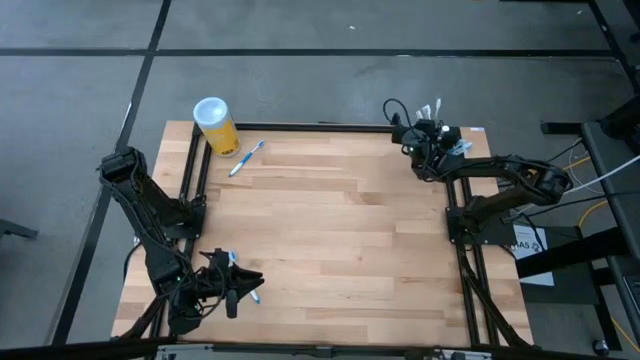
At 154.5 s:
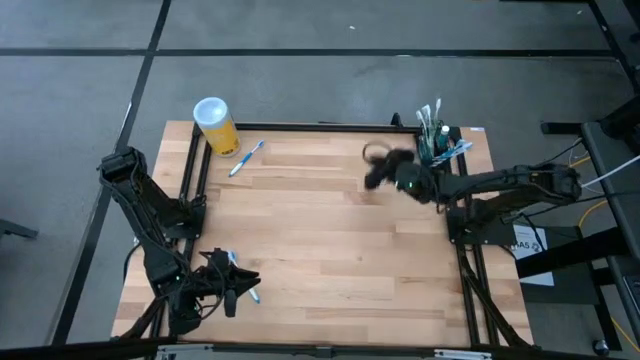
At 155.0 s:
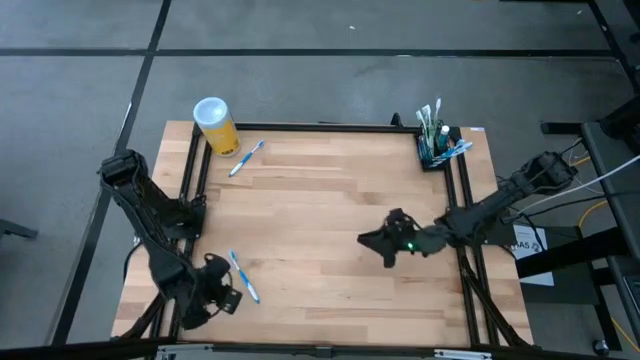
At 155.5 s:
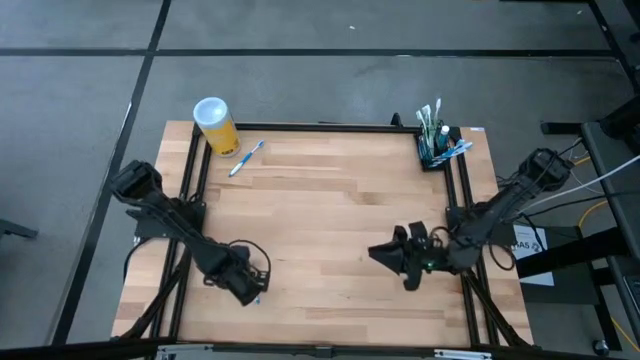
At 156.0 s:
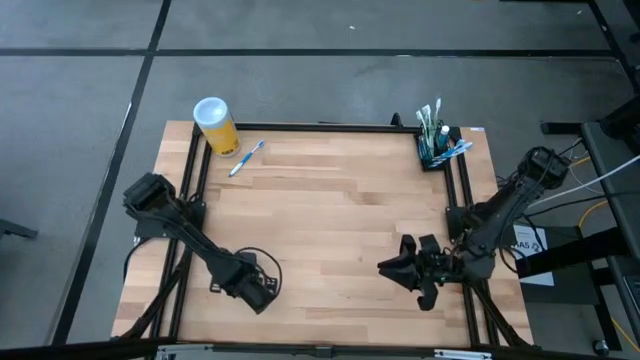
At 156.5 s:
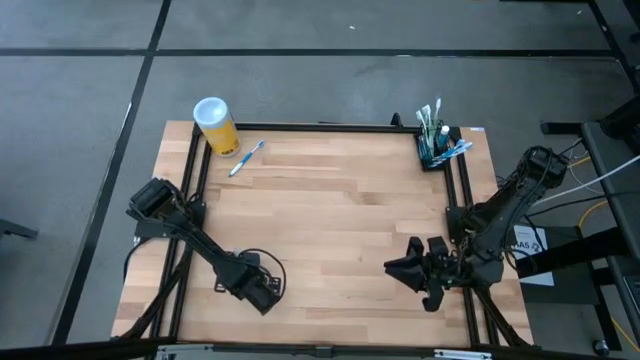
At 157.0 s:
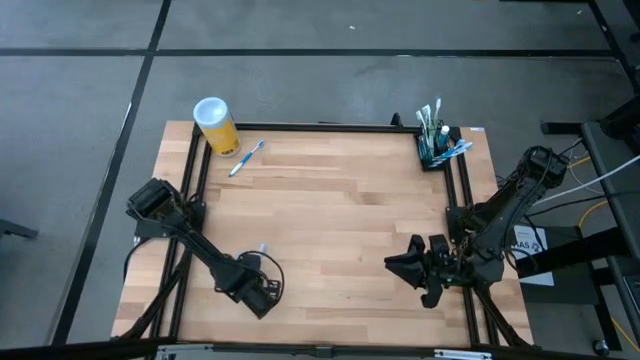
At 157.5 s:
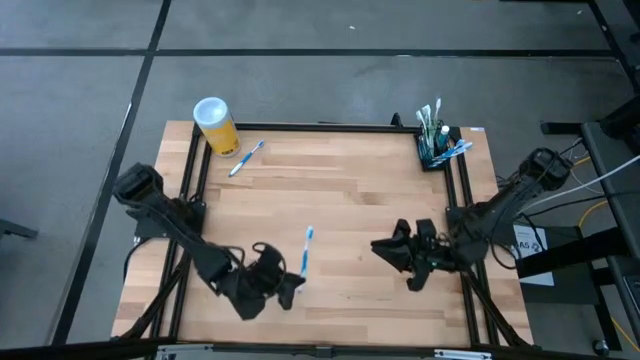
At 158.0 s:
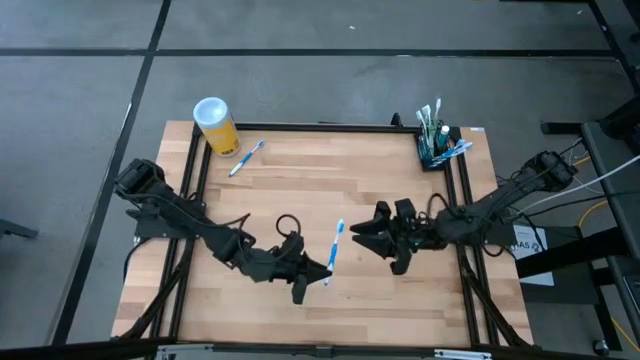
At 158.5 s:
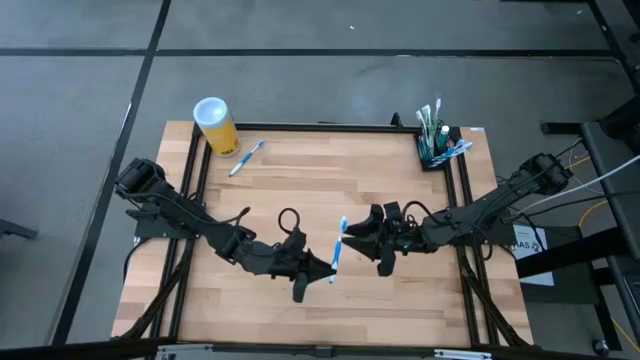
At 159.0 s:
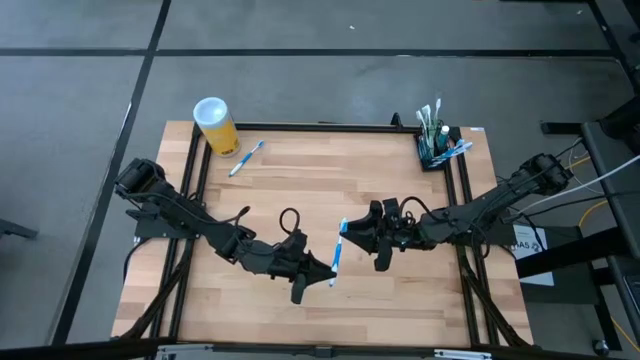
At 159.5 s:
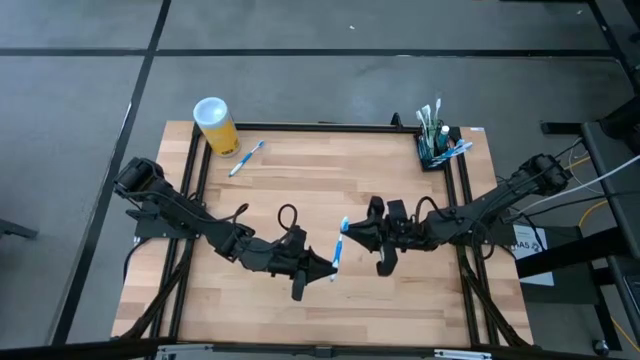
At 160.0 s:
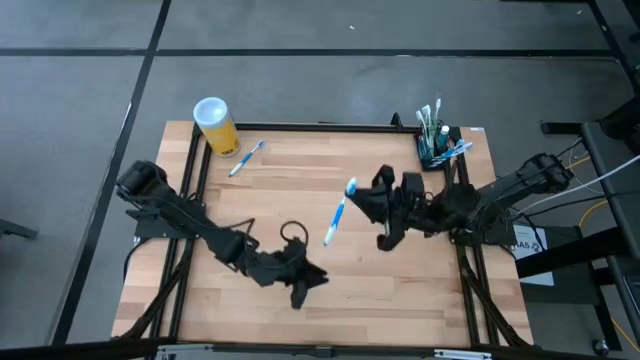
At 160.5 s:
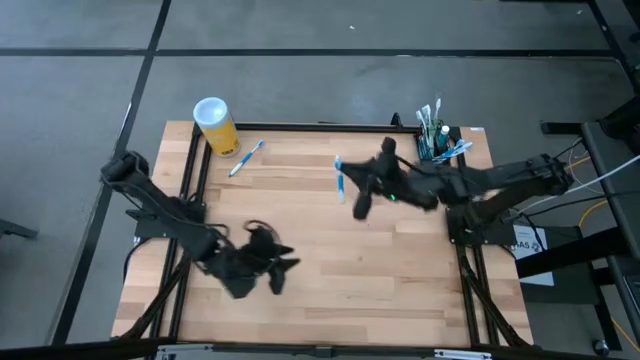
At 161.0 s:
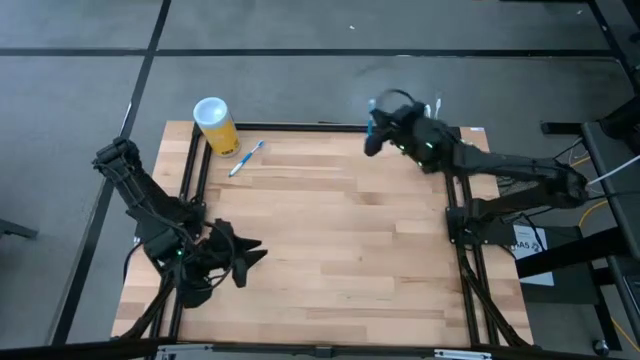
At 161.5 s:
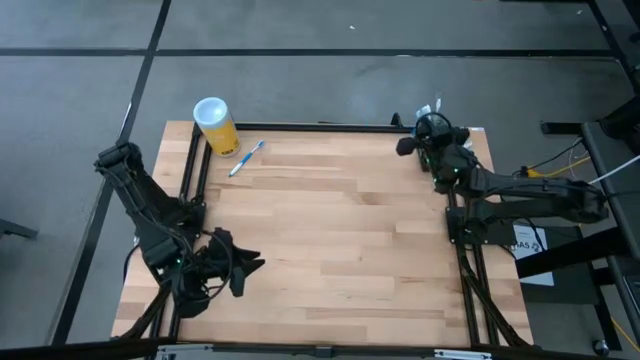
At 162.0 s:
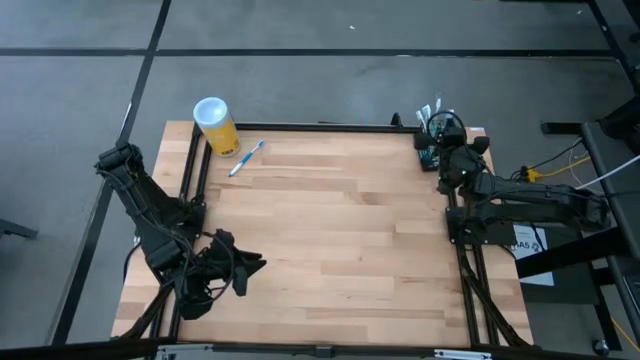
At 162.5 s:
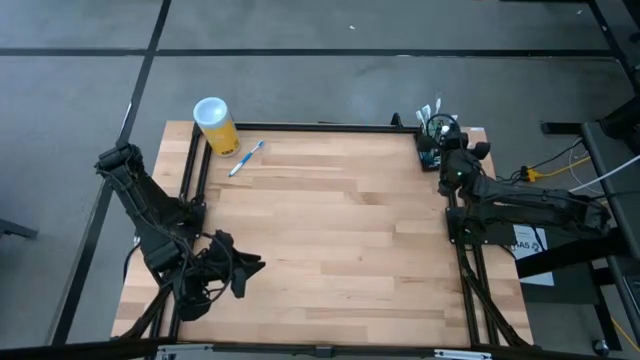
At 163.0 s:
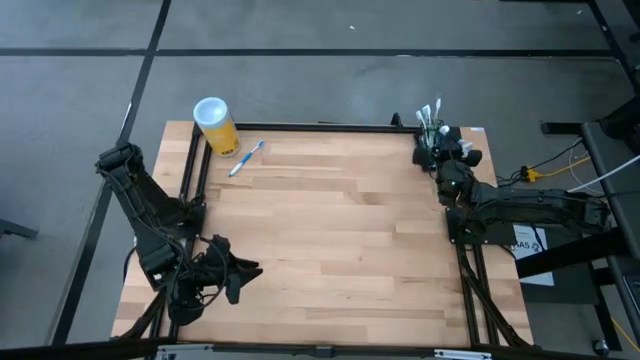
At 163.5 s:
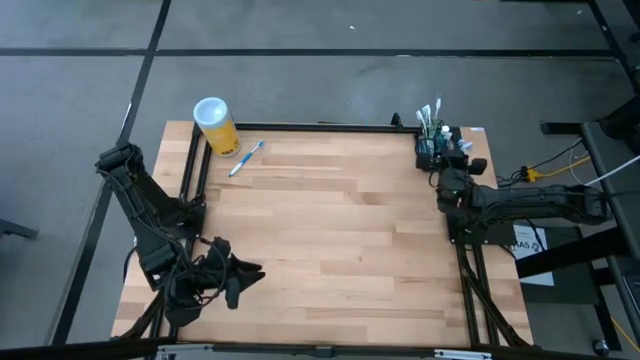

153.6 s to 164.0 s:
Task: Pick & Place toothbrushing station
Put the blue toothbrush into the mesh organizer

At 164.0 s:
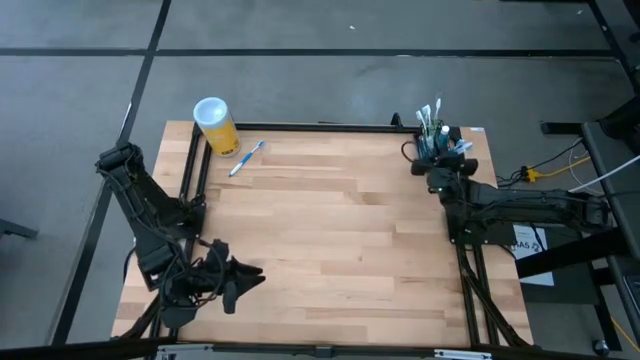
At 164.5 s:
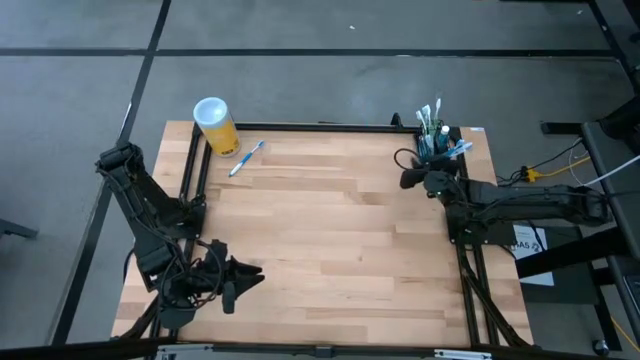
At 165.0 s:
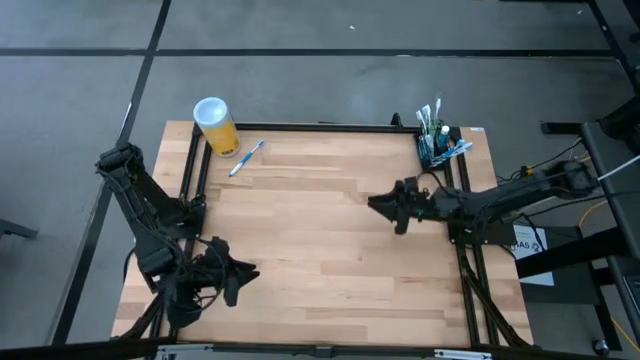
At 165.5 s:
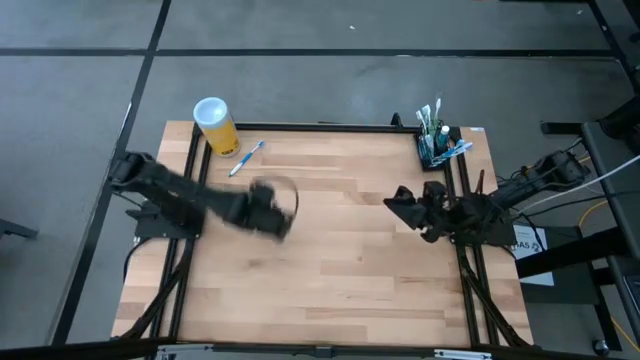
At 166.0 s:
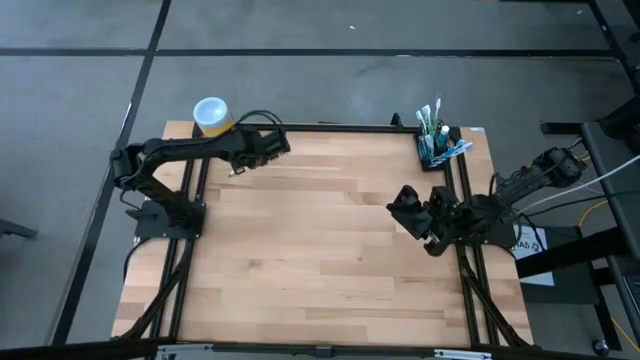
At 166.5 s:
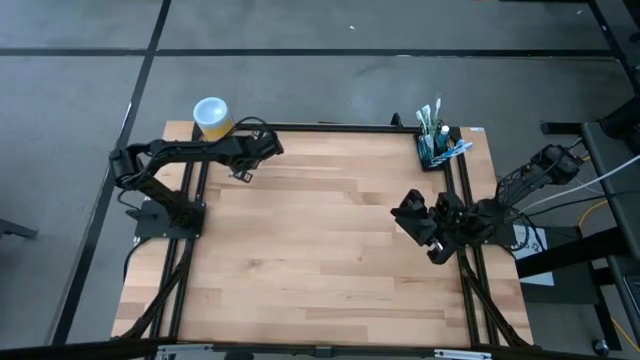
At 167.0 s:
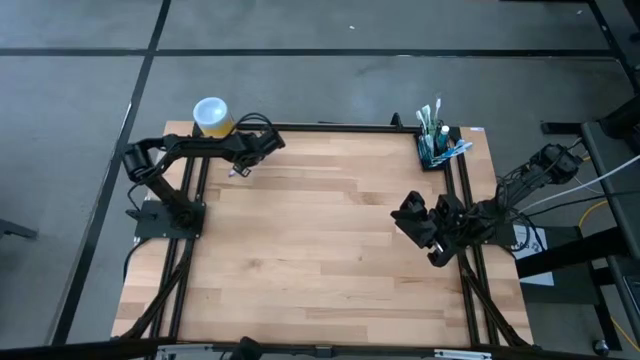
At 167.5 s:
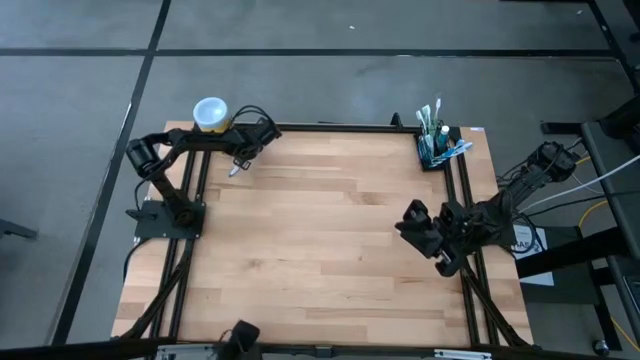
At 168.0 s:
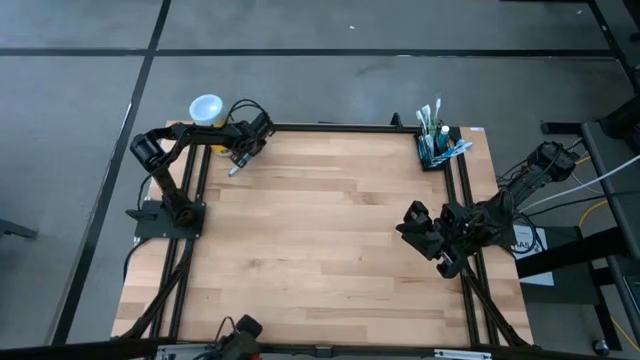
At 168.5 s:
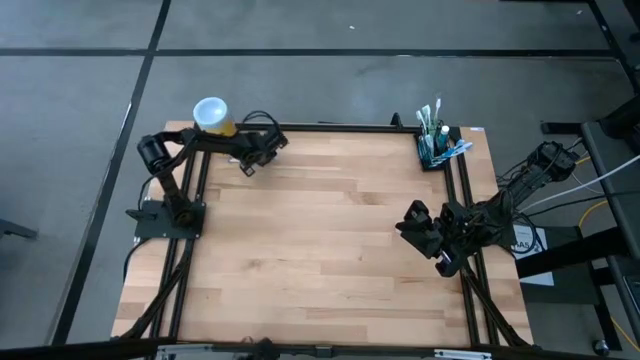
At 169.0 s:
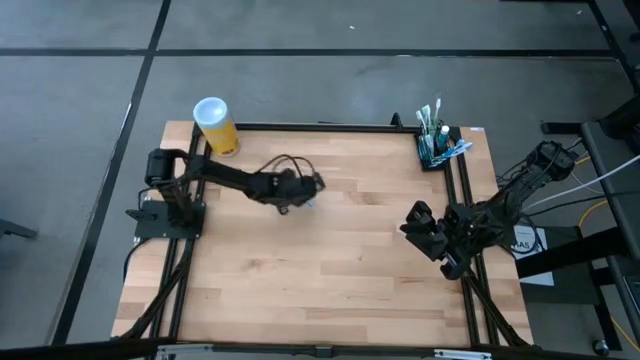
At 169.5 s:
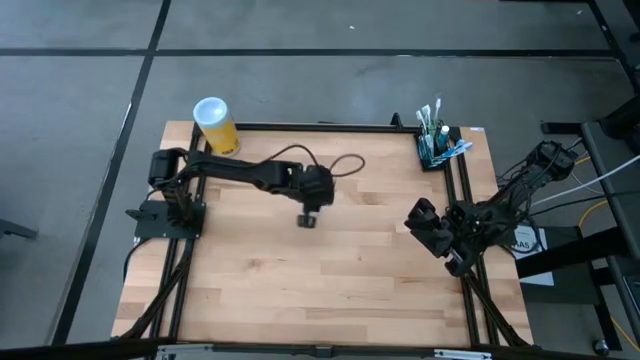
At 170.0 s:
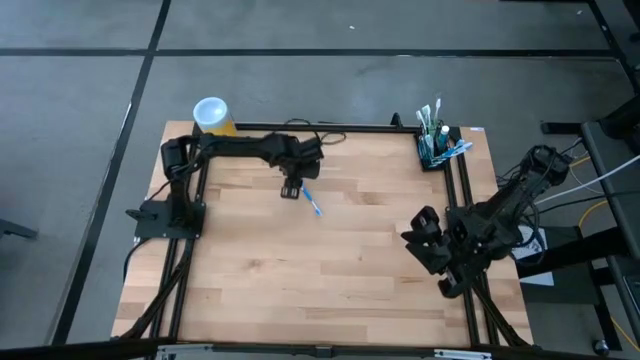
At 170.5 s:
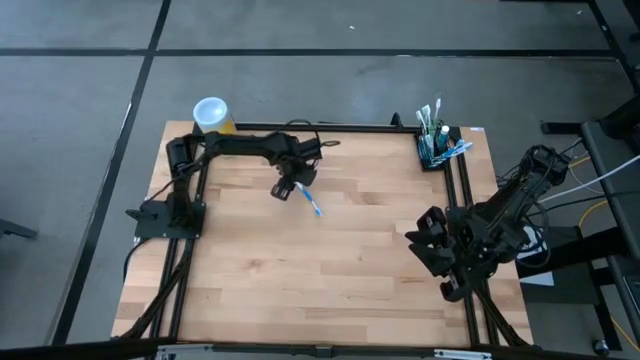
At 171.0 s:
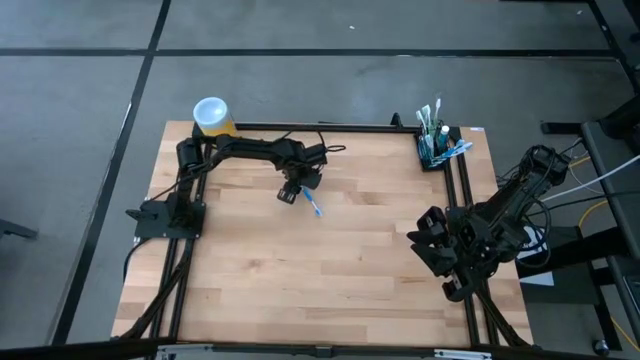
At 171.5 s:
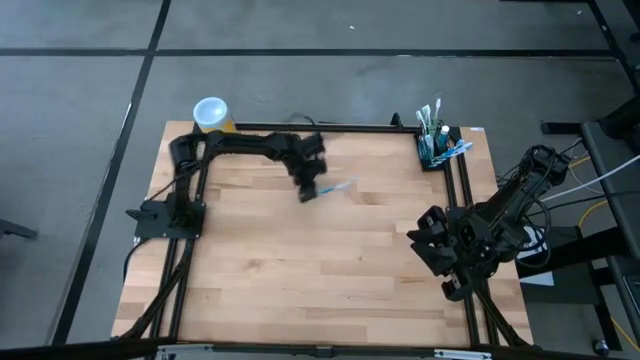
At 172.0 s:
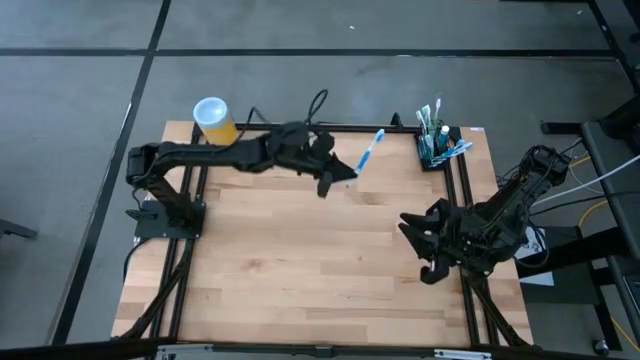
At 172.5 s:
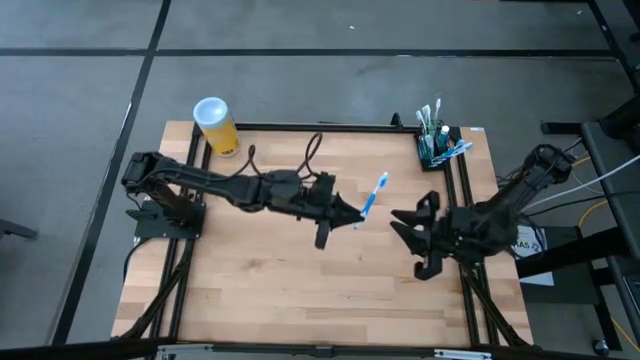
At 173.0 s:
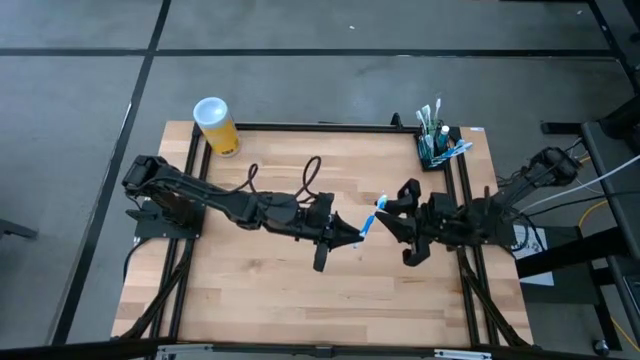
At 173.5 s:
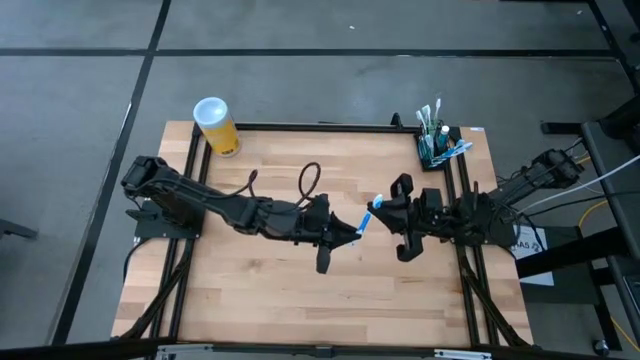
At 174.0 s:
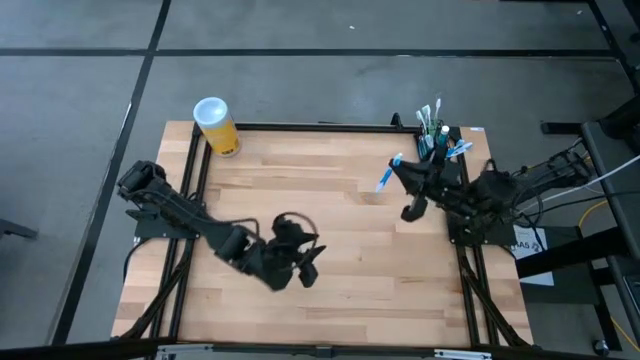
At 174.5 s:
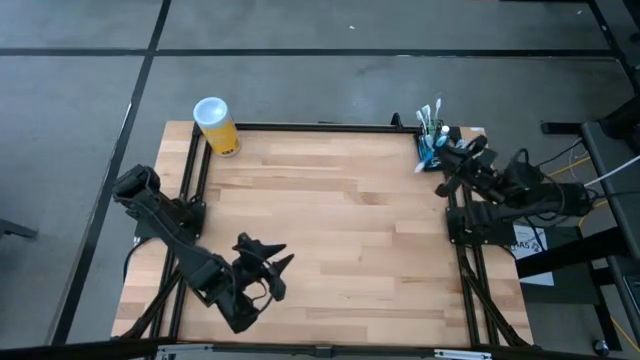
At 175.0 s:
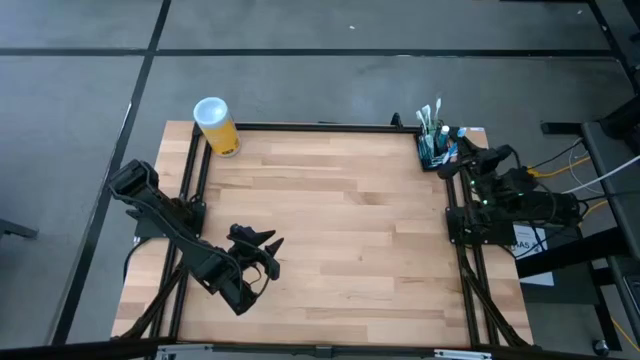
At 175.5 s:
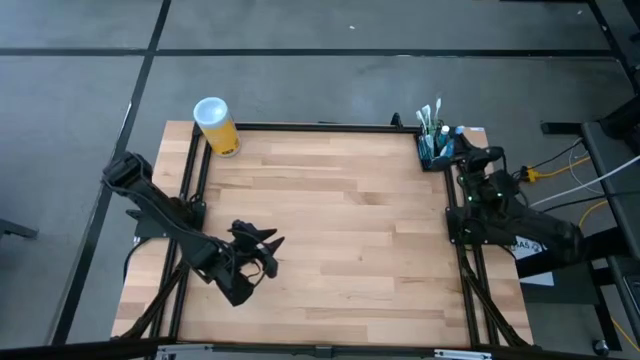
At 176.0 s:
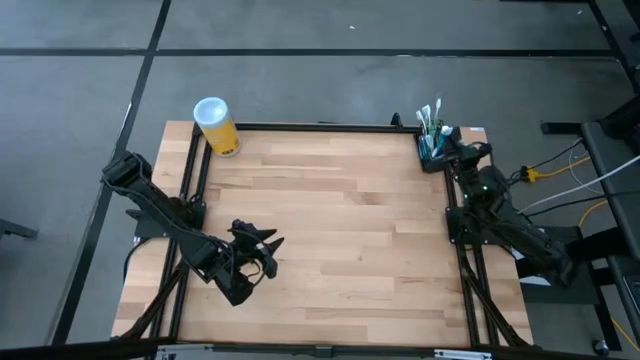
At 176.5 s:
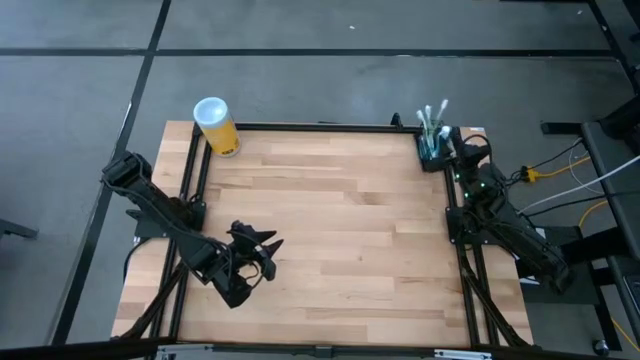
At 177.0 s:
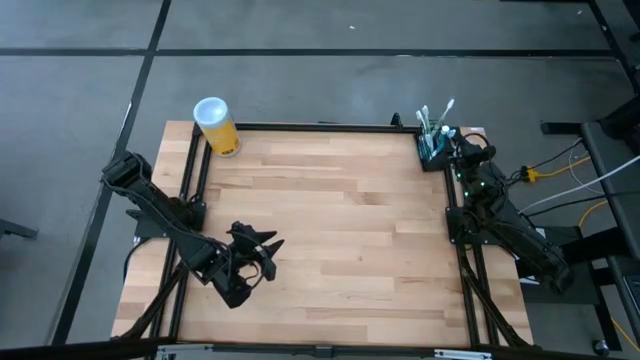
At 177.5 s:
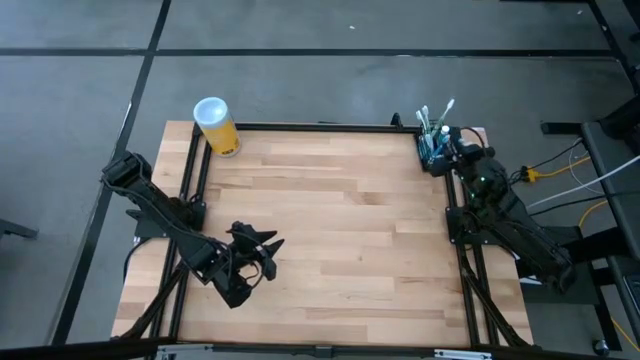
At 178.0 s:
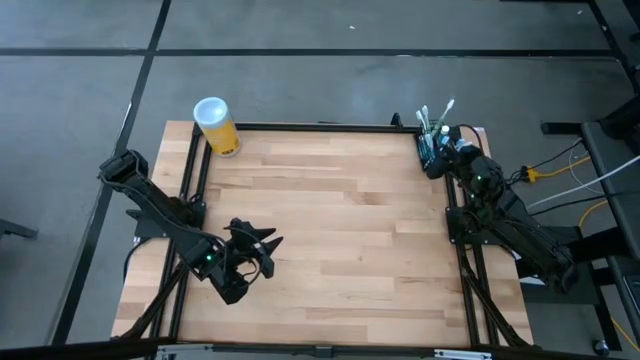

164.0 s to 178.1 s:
Put the blue toothbrush into the mesh organizer
